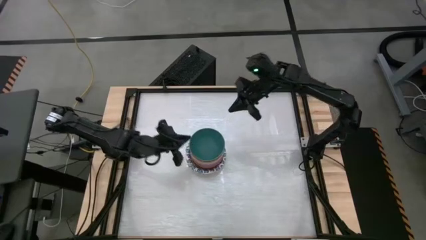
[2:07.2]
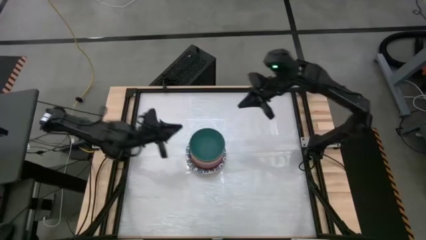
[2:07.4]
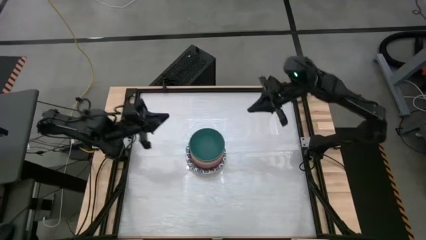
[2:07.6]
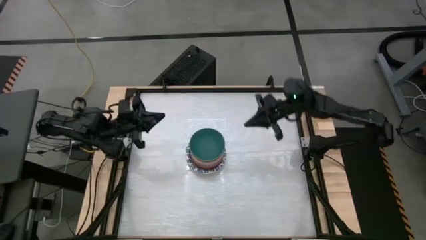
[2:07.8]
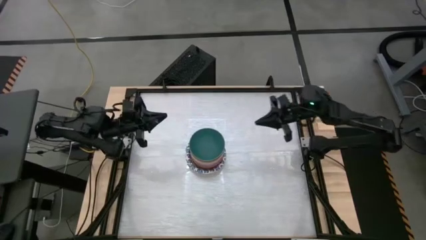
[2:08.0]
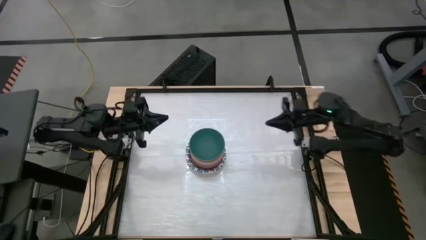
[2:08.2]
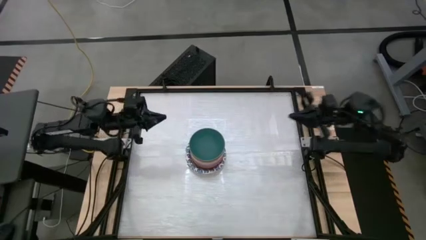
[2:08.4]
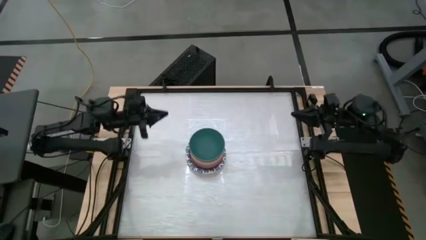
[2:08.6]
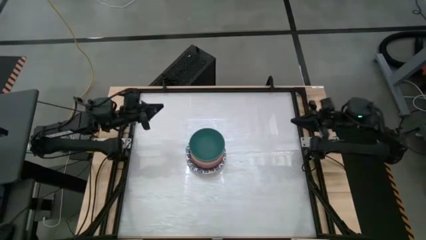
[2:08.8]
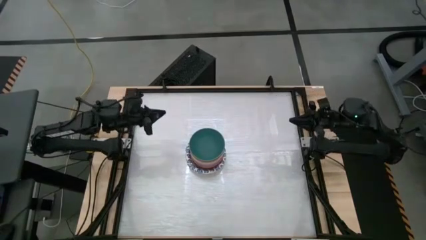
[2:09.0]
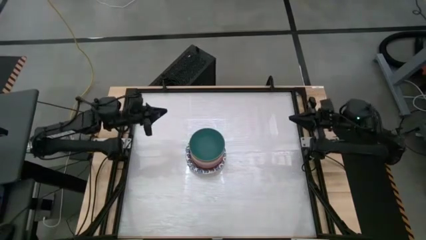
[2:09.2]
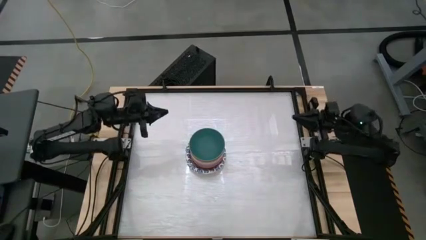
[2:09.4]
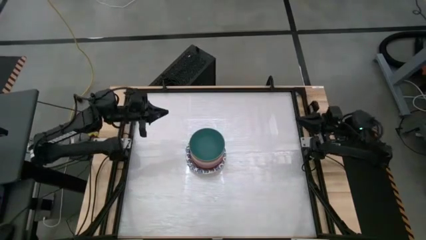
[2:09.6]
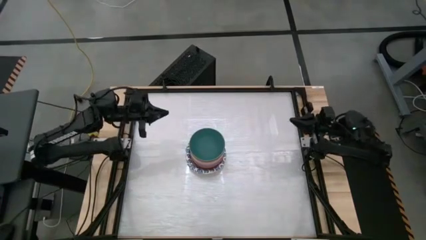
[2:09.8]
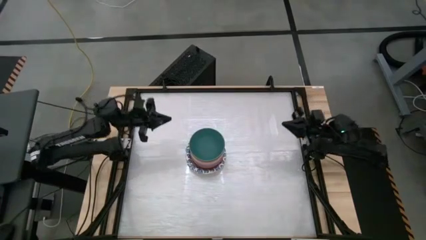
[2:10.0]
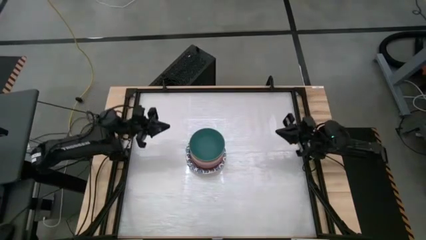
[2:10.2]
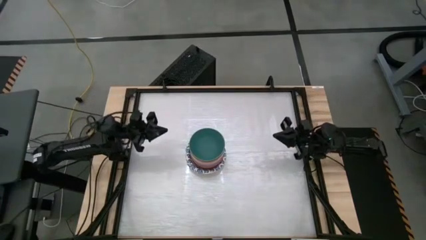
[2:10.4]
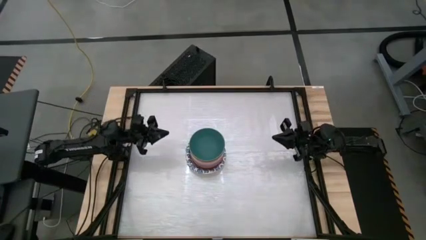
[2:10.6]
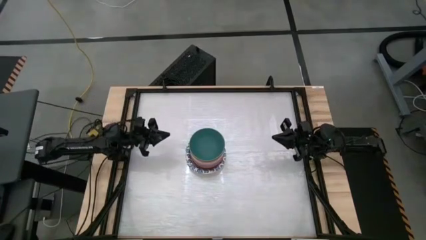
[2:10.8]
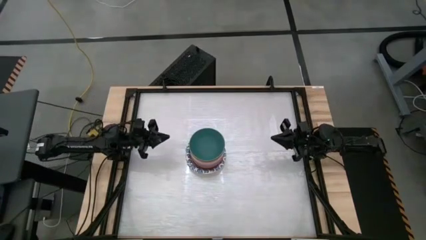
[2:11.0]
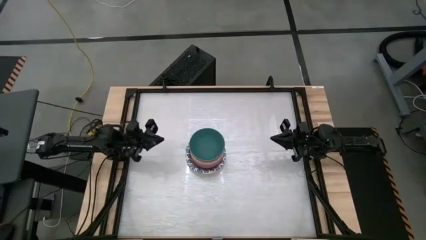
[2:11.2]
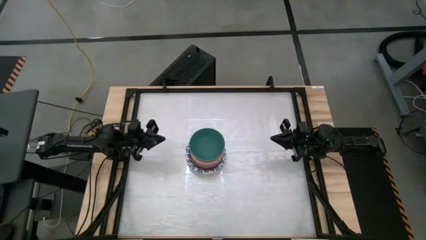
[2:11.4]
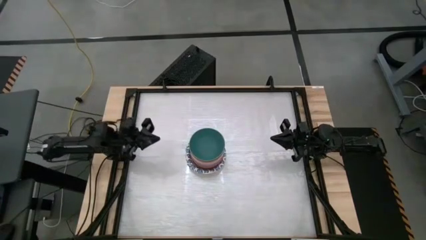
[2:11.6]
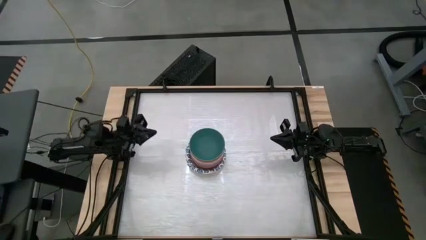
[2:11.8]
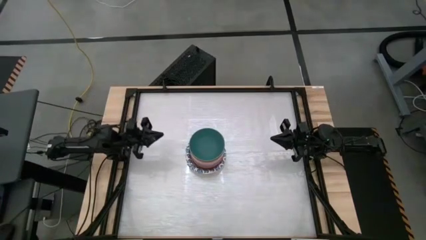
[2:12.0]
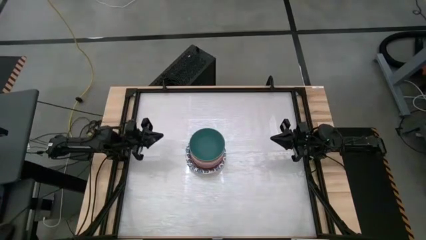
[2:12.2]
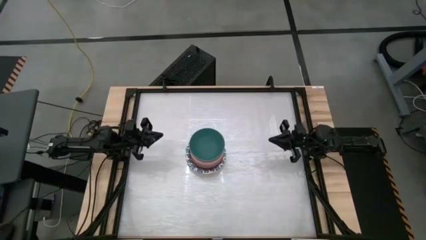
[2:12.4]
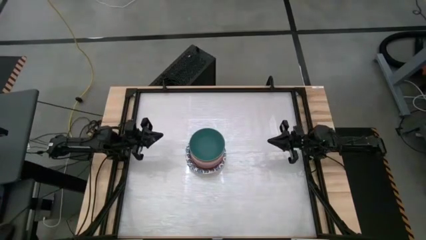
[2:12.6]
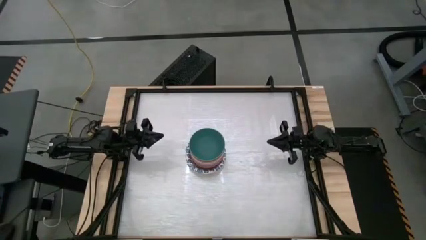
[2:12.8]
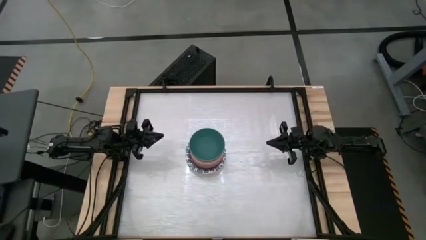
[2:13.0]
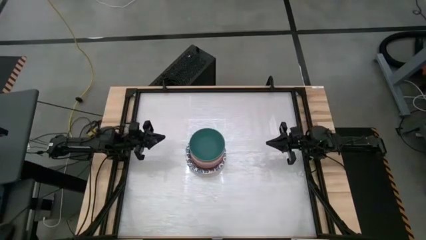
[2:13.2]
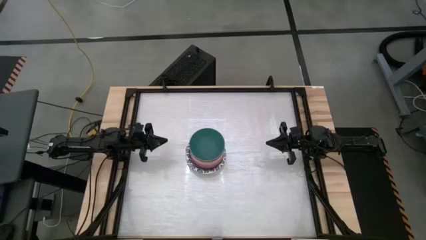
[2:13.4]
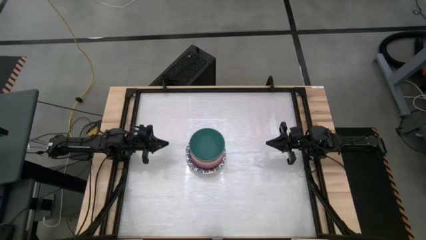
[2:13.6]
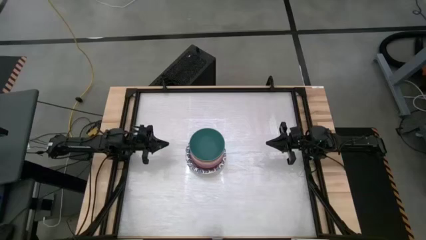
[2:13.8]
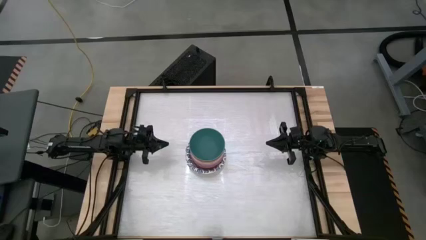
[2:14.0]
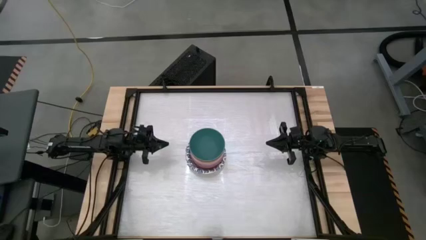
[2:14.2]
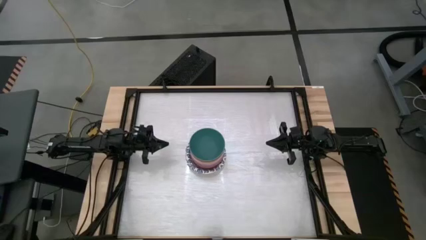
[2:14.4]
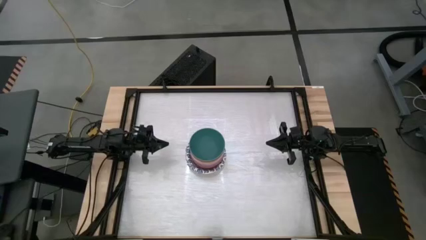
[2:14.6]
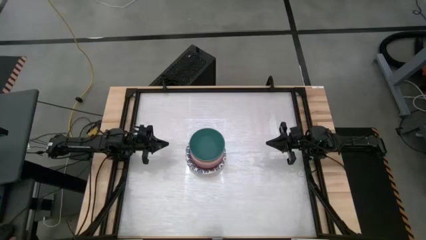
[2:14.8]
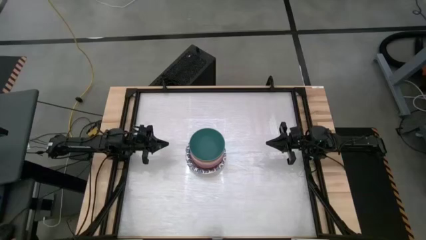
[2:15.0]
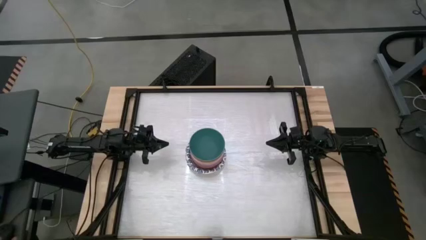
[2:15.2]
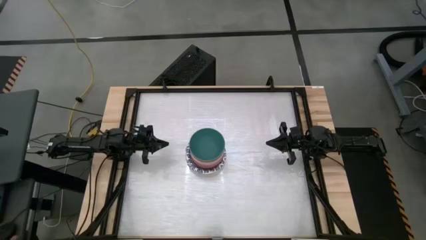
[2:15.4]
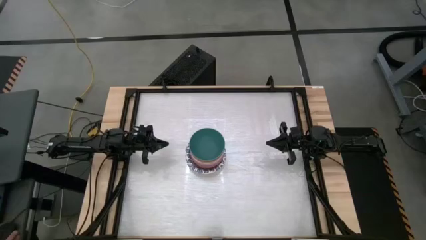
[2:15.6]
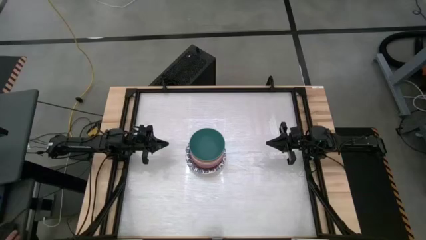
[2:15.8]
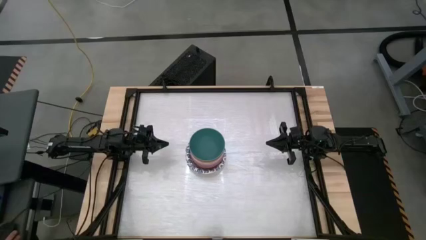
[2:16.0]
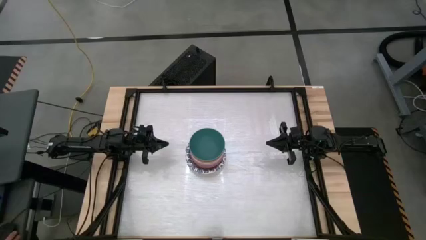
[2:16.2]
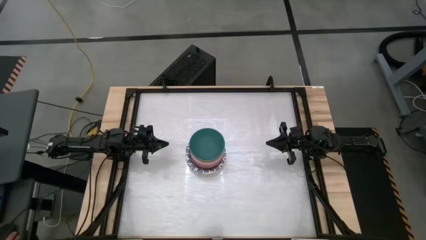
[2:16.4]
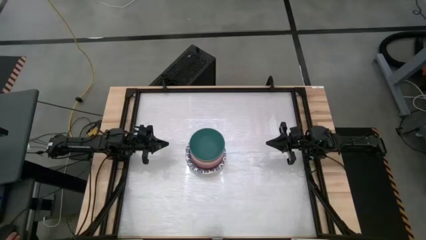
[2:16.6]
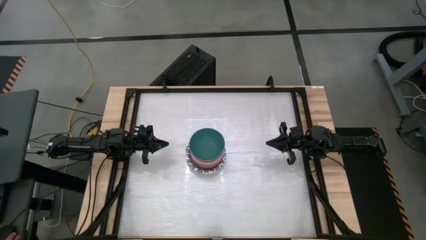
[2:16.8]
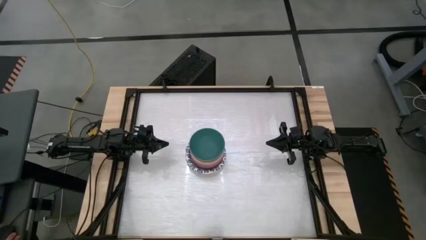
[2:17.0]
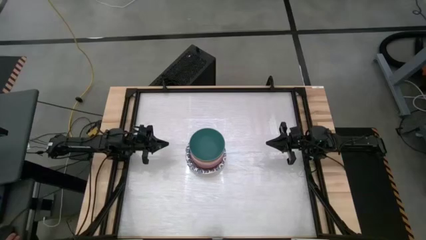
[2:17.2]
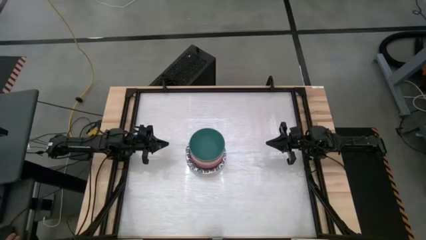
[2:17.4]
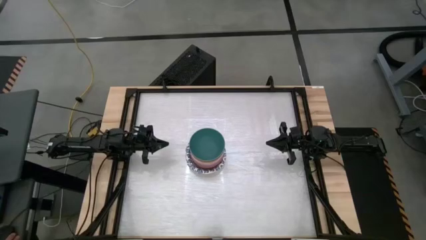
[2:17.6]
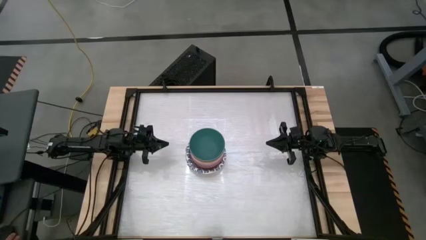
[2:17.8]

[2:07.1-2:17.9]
Return to Home Position
